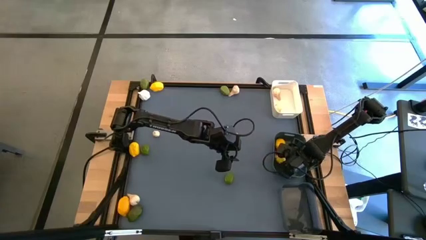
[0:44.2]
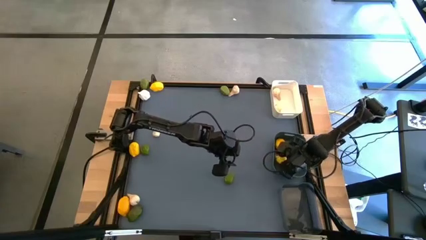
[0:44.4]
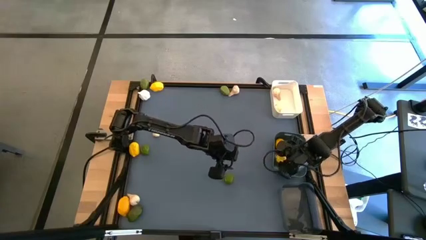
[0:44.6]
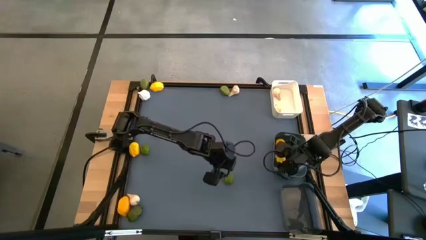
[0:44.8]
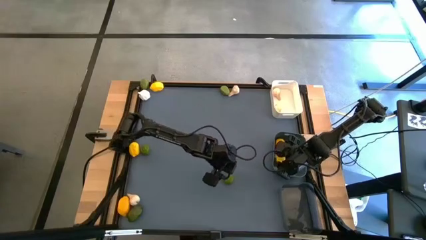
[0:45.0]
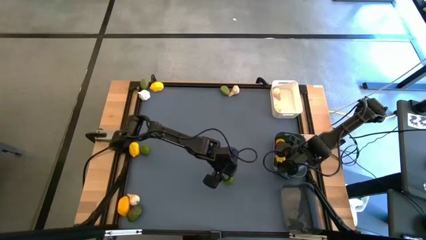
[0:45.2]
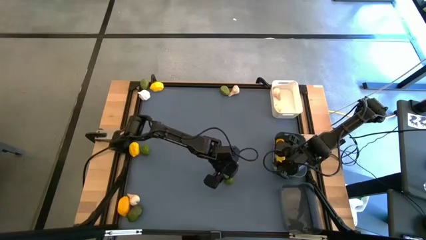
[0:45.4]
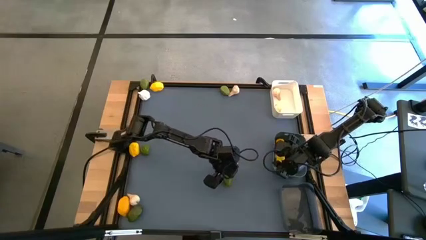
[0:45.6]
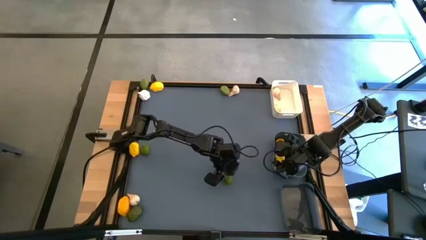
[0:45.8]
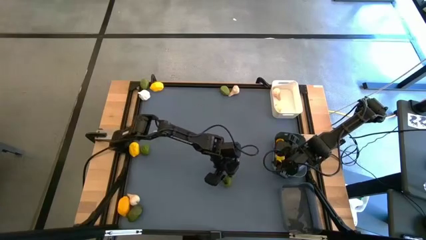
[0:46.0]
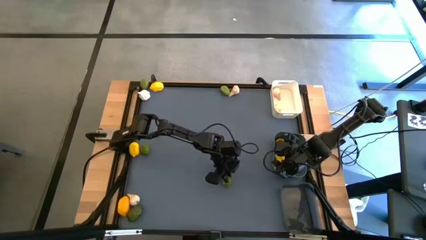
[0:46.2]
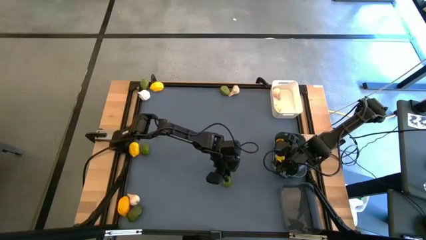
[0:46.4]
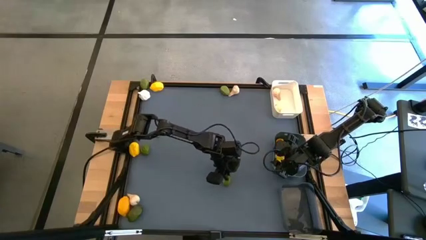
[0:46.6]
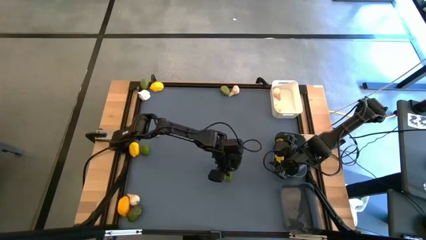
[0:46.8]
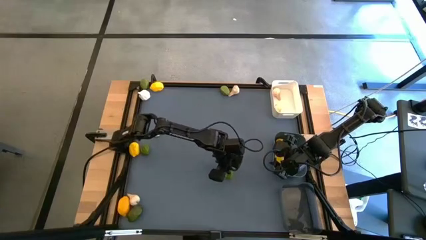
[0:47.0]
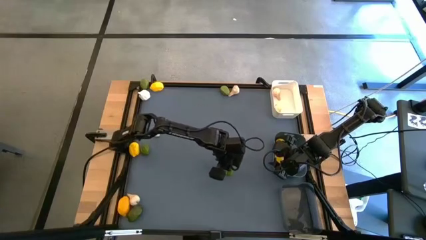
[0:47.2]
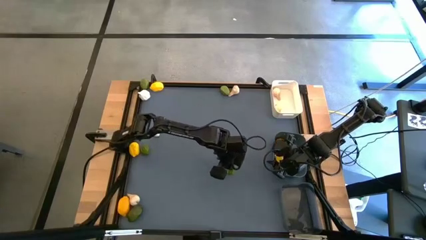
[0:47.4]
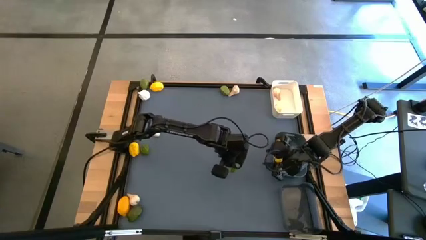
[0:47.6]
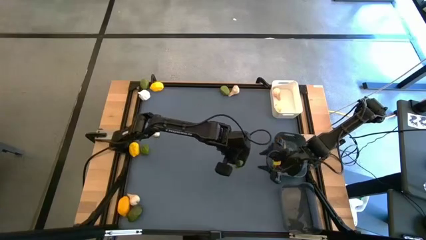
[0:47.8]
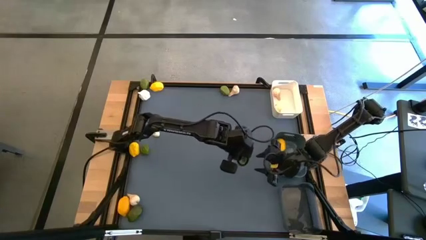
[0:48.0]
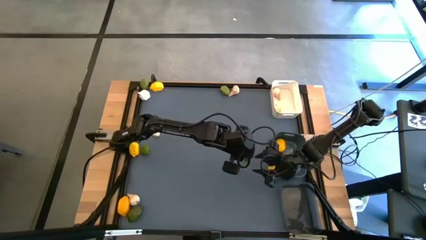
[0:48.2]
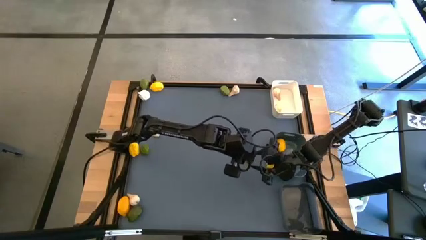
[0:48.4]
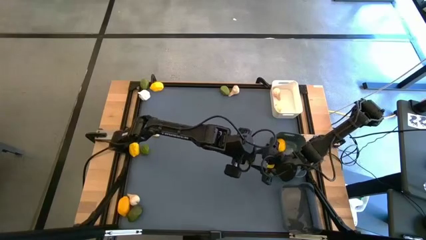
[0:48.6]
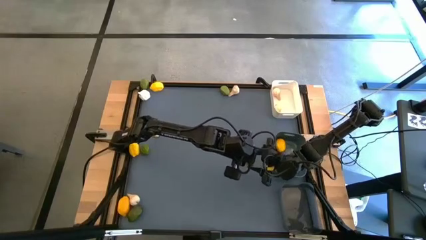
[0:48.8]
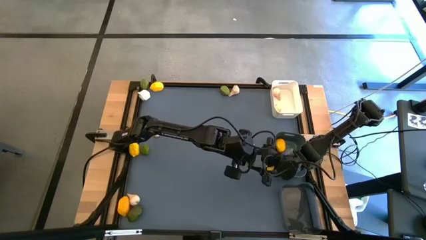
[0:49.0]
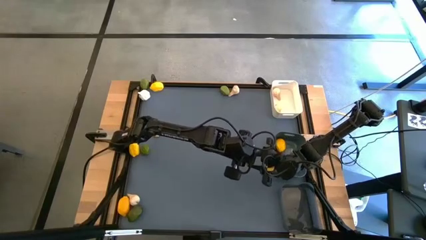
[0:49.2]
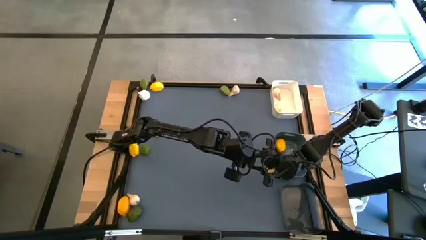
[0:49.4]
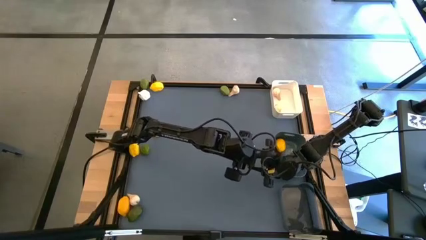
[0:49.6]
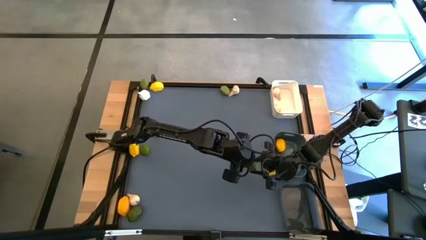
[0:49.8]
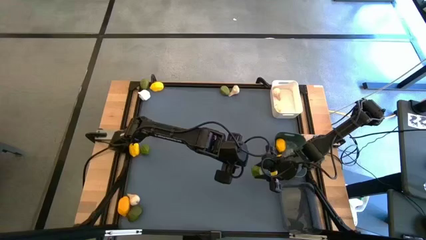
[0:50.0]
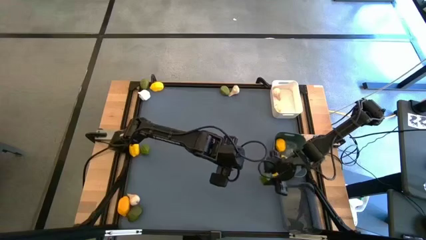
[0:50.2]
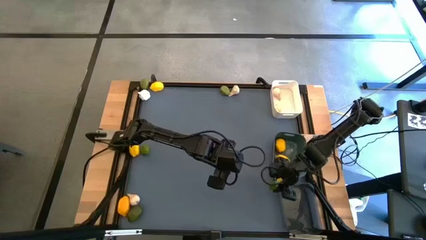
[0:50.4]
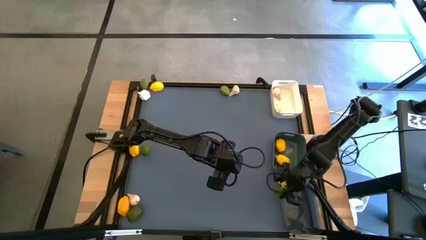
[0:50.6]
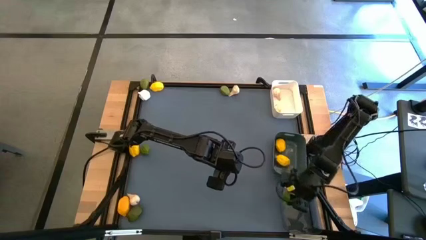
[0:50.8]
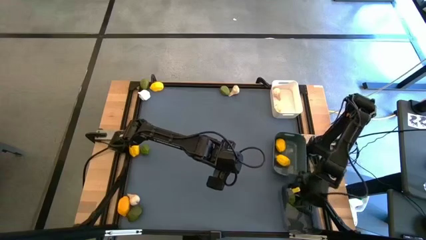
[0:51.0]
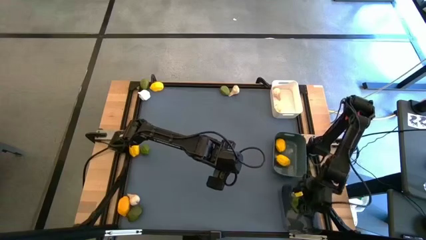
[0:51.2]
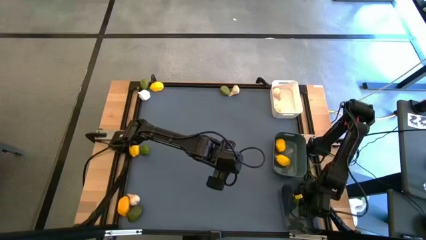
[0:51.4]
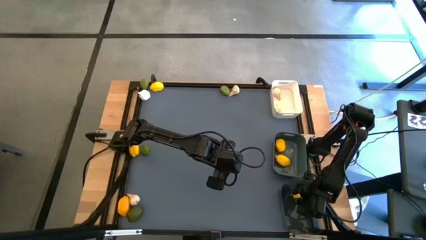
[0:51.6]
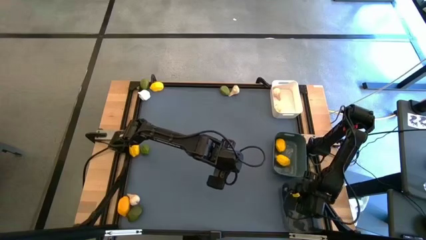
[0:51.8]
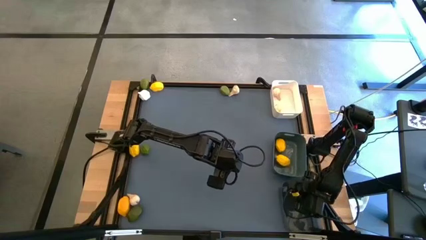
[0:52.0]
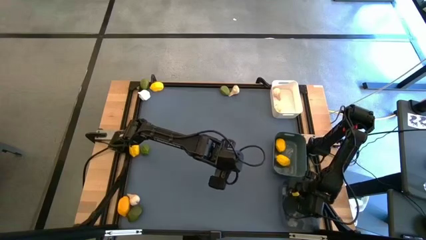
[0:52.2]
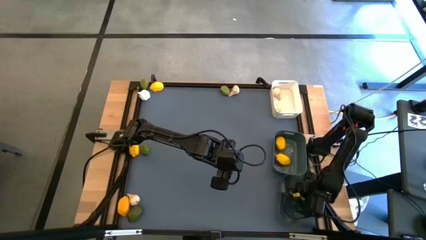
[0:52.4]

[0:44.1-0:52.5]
Task: Sort produce into baskets
Put the green lime into the black bin

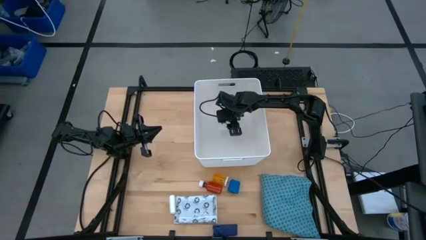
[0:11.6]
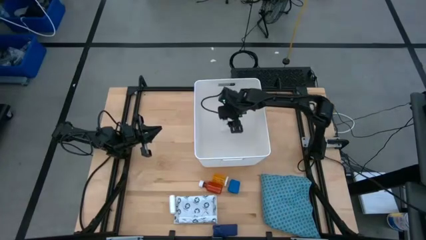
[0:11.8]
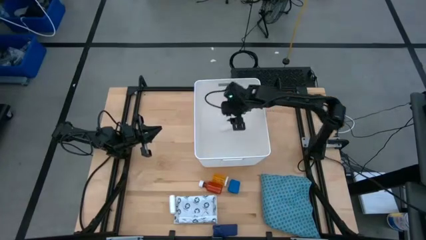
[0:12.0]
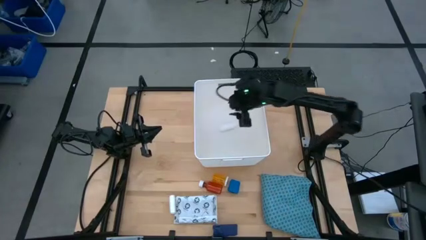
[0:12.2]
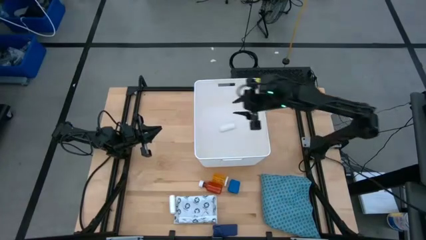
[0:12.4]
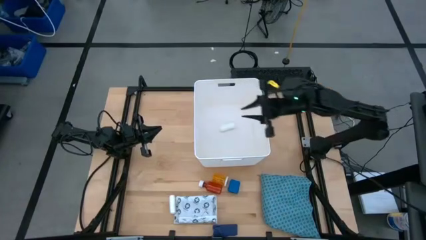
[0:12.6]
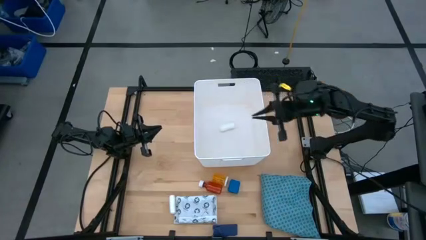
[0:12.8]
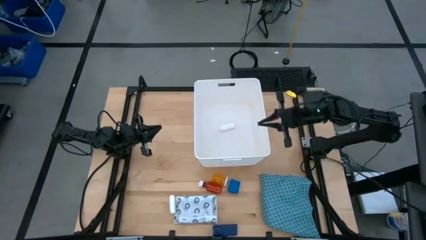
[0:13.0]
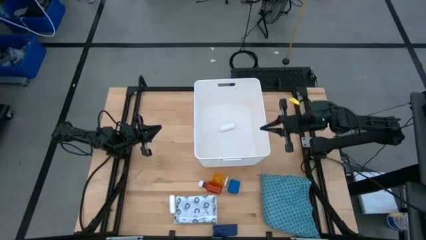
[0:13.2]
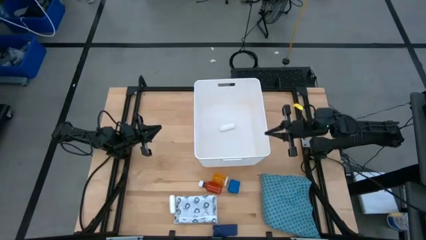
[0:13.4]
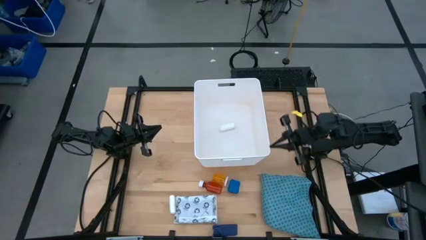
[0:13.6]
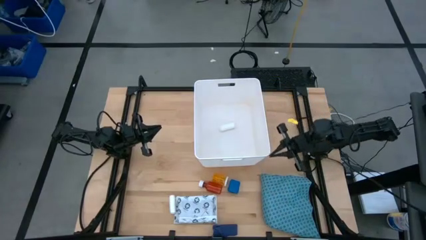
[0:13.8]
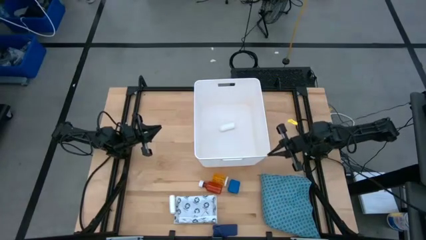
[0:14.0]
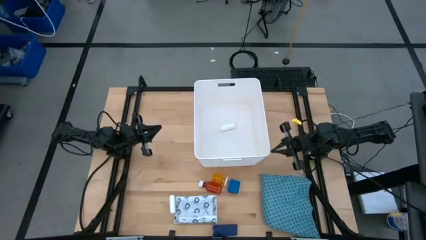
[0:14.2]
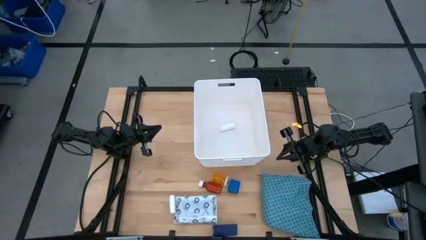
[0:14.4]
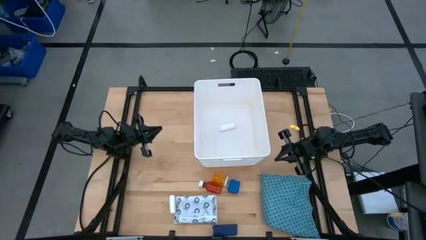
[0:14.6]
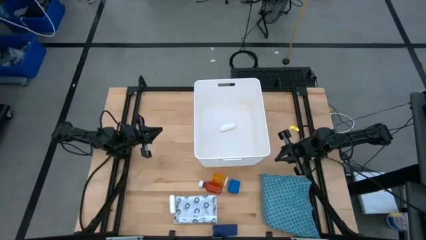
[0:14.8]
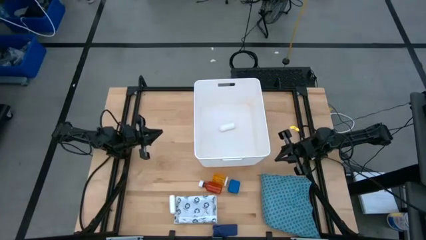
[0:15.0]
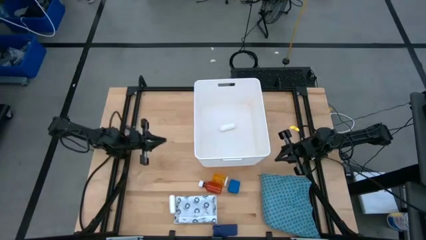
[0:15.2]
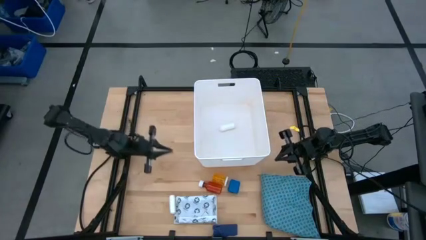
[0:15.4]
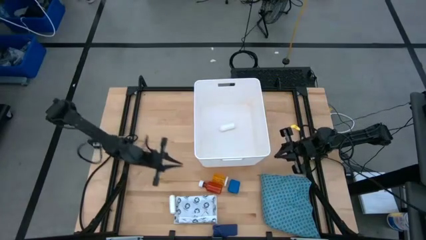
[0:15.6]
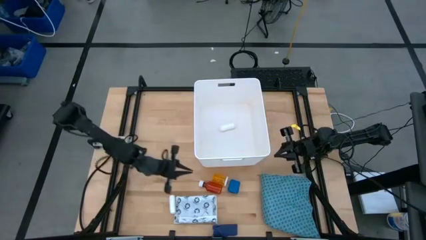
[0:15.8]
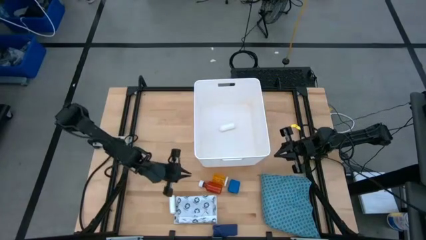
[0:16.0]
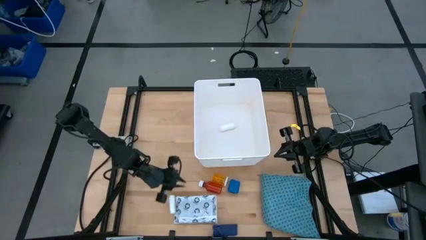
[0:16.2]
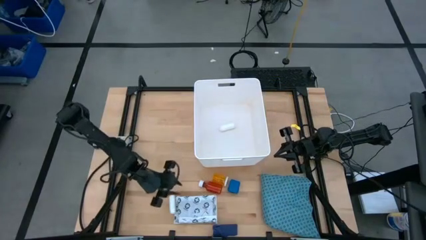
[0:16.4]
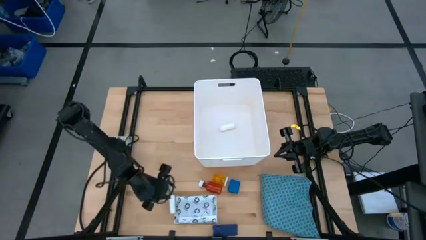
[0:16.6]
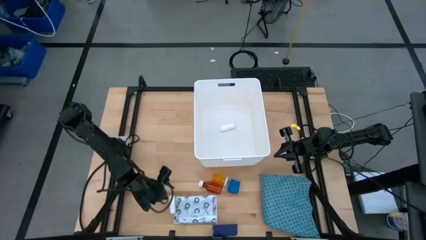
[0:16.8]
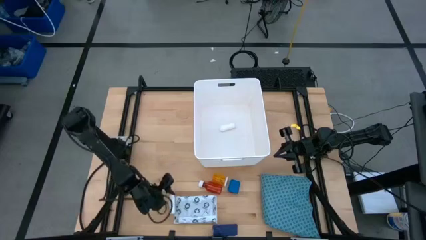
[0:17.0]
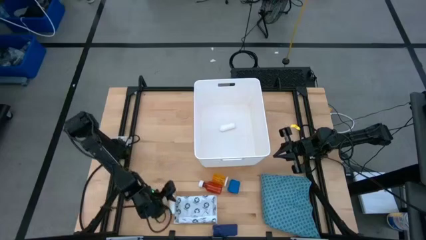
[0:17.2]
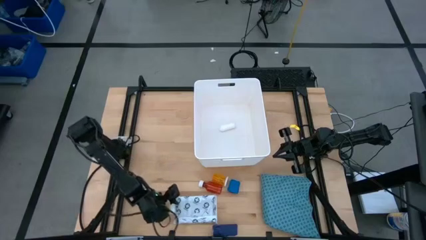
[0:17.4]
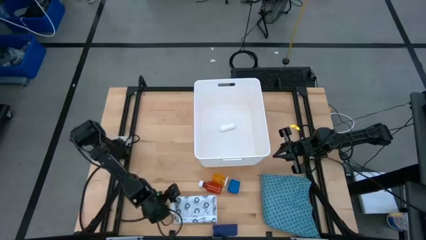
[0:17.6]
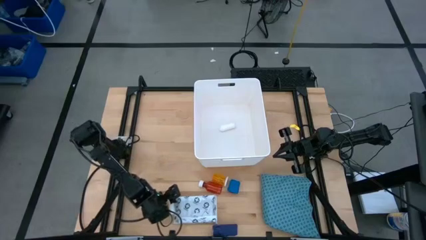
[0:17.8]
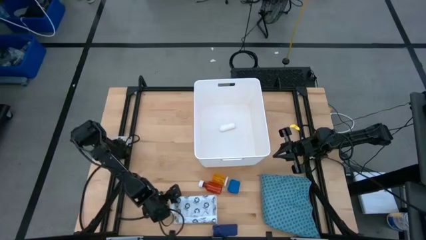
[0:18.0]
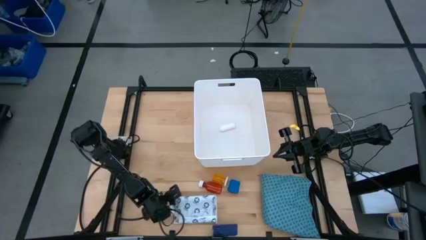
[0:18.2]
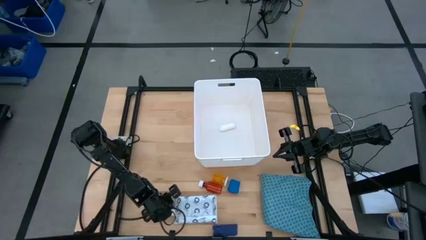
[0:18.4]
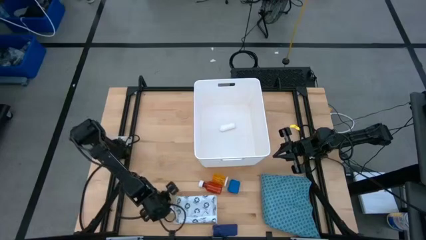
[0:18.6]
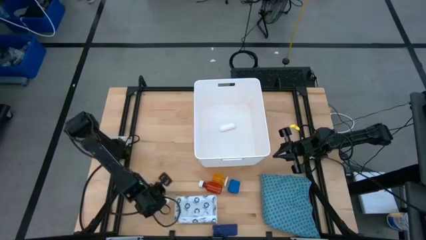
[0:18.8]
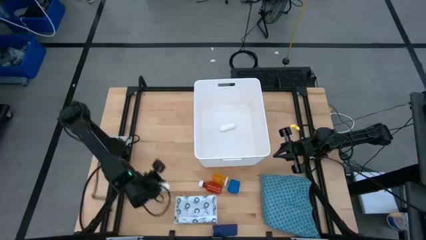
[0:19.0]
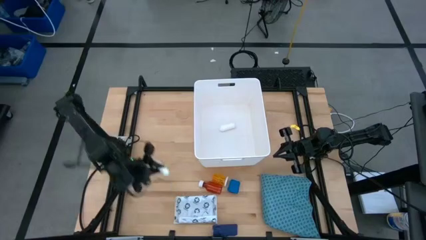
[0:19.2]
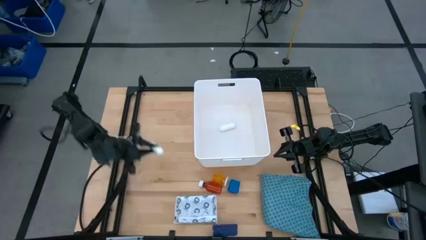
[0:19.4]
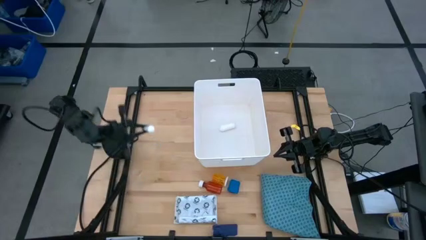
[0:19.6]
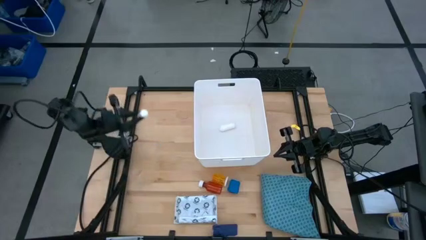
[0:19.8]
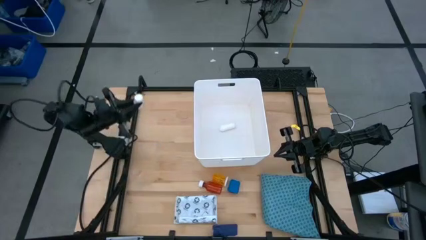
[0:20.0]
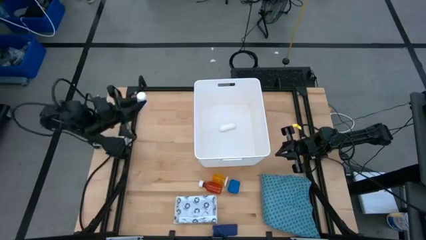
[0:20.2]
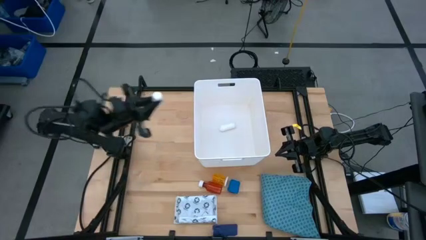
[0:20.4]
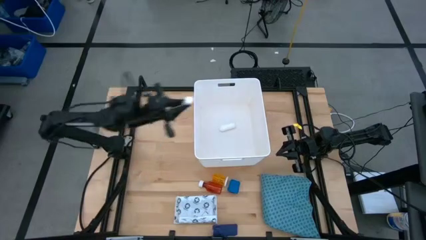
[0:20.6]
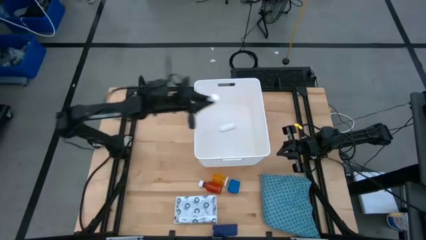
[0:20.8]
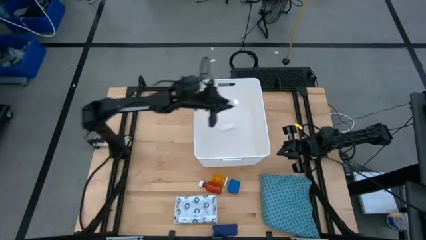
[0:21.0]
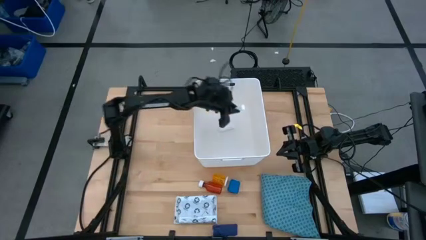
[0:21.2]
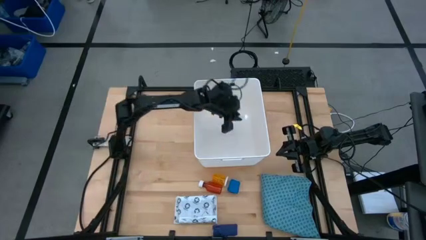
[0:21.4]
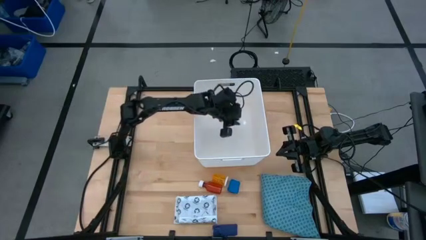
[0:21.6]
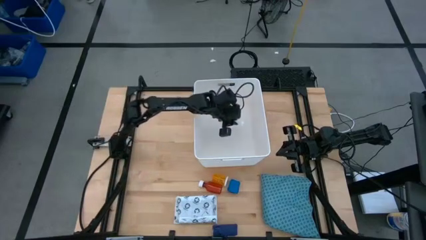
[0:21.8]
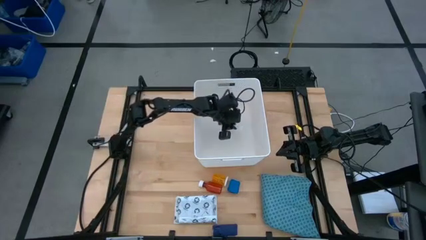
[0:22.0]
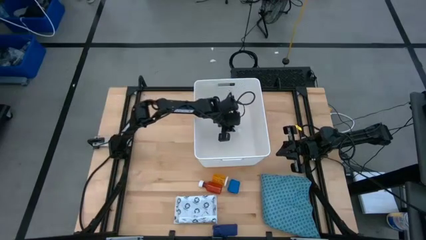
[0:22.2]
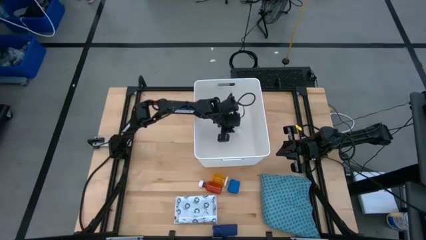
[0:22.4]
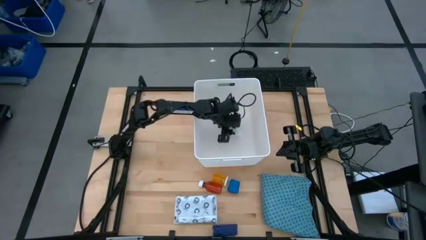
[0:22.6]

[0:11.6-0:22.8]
Task: Pick & place medical supplies in basket/bin
Put the rolled white gauze into the white container
